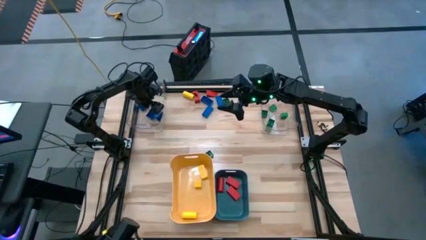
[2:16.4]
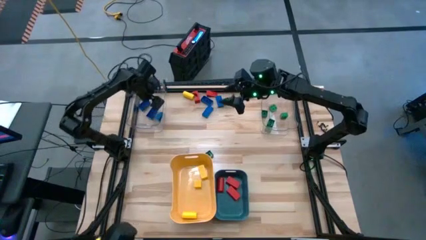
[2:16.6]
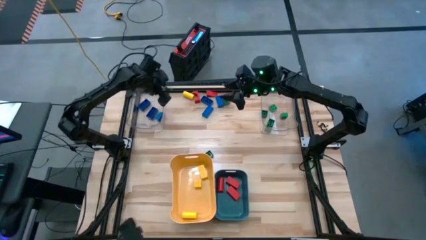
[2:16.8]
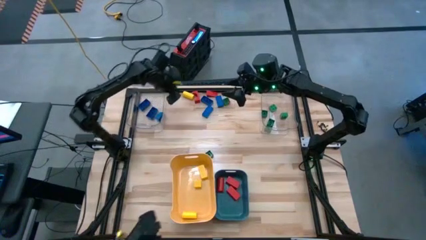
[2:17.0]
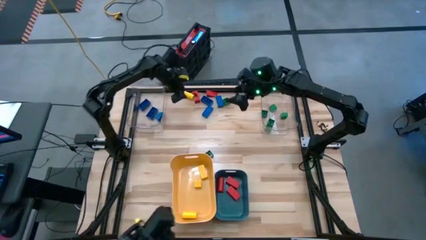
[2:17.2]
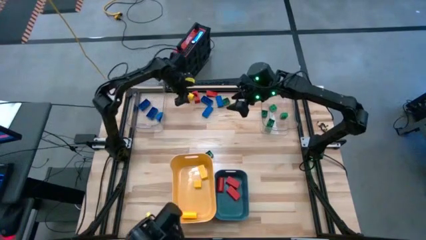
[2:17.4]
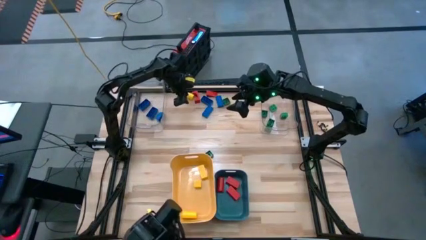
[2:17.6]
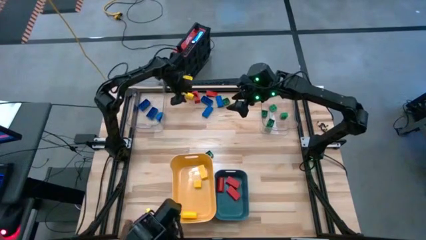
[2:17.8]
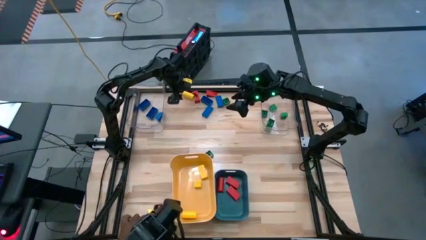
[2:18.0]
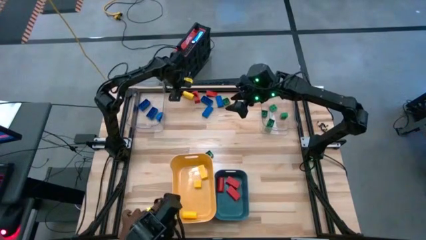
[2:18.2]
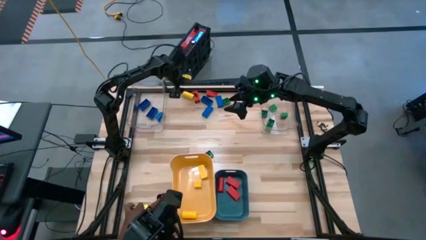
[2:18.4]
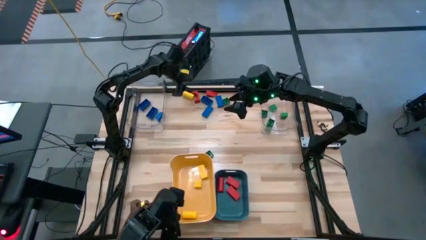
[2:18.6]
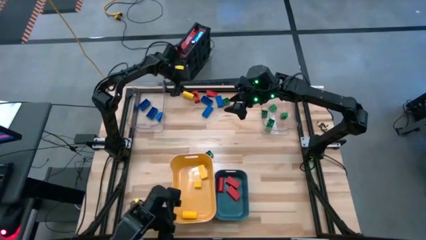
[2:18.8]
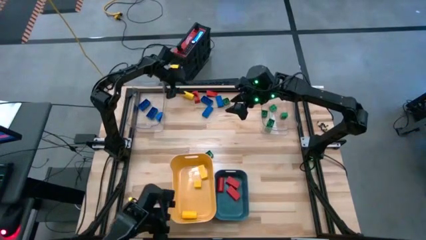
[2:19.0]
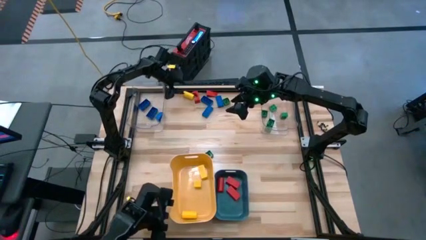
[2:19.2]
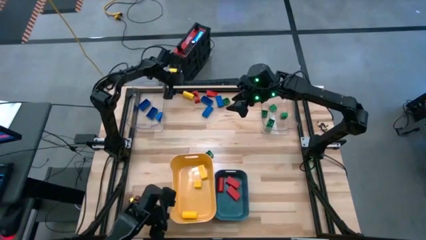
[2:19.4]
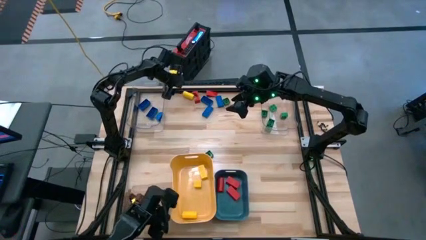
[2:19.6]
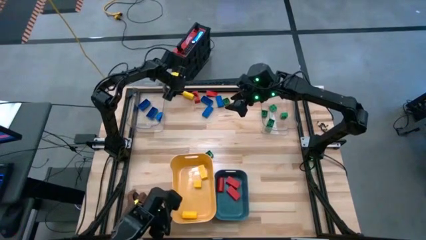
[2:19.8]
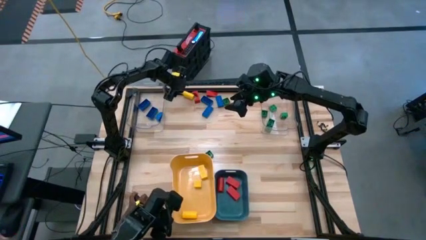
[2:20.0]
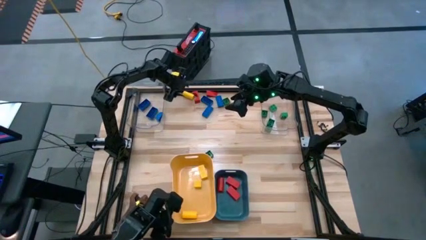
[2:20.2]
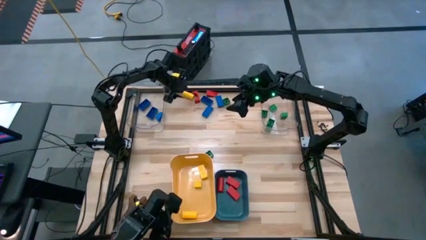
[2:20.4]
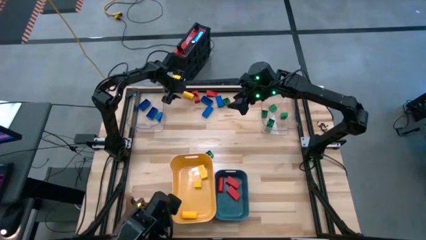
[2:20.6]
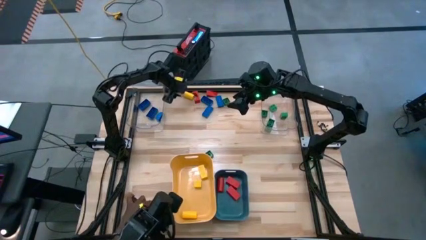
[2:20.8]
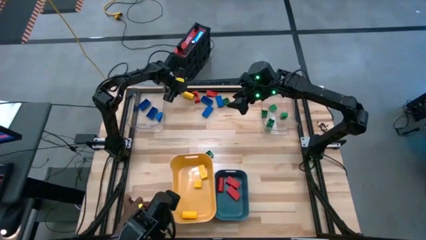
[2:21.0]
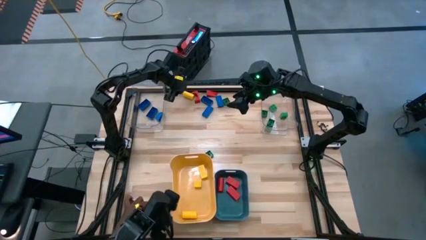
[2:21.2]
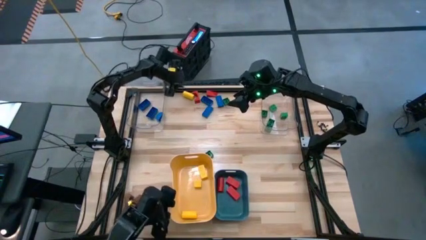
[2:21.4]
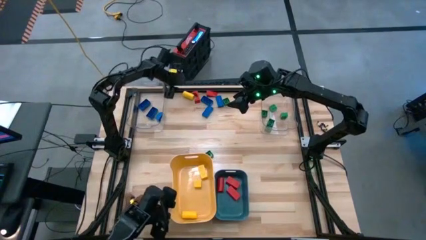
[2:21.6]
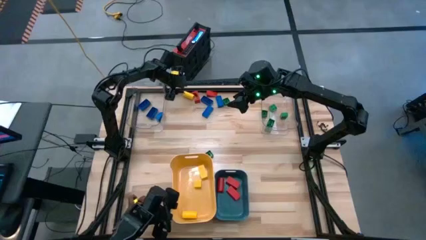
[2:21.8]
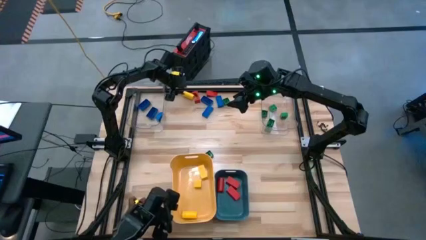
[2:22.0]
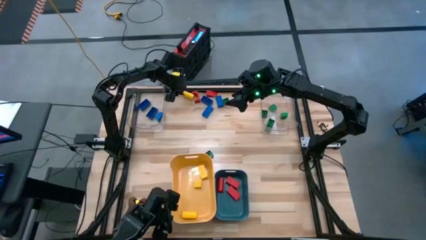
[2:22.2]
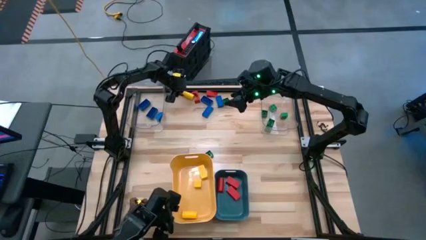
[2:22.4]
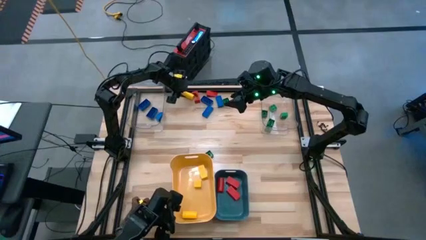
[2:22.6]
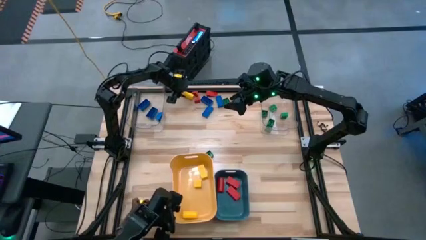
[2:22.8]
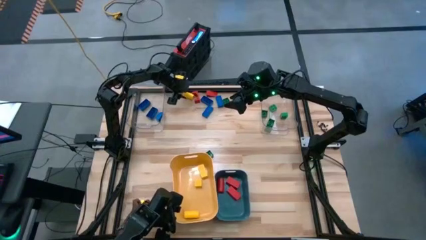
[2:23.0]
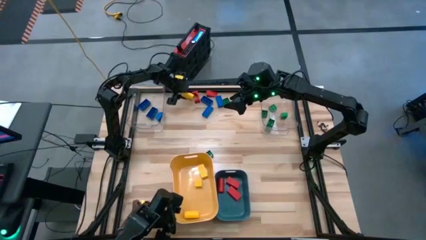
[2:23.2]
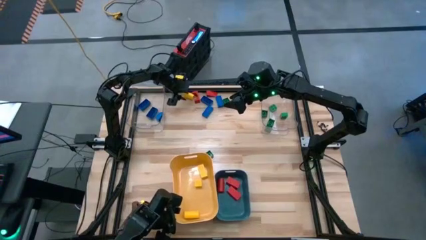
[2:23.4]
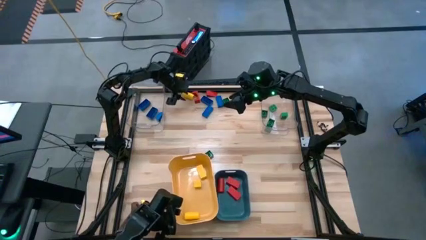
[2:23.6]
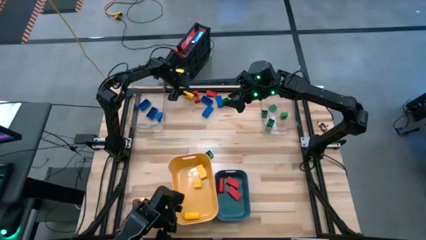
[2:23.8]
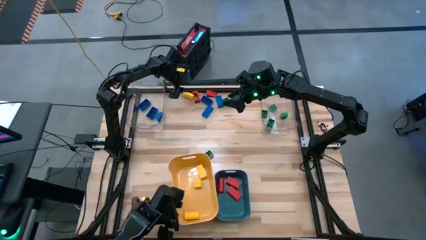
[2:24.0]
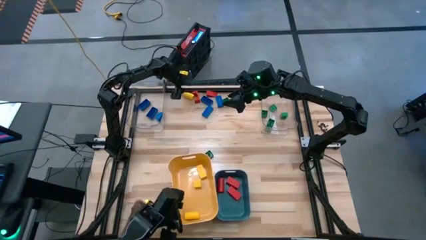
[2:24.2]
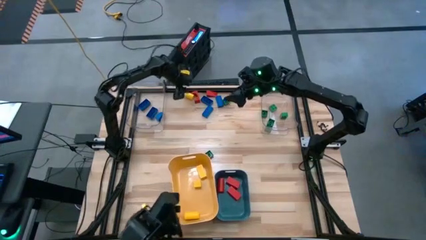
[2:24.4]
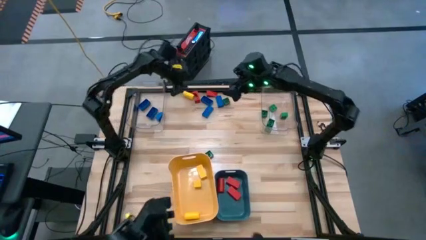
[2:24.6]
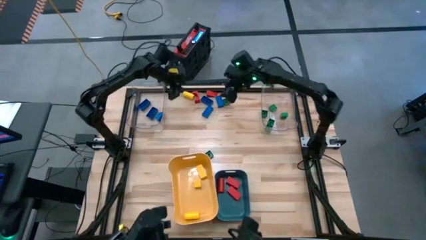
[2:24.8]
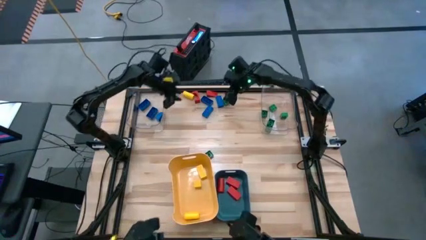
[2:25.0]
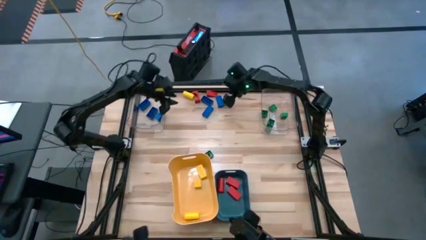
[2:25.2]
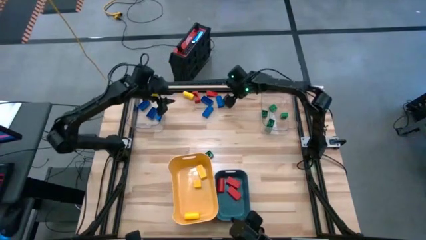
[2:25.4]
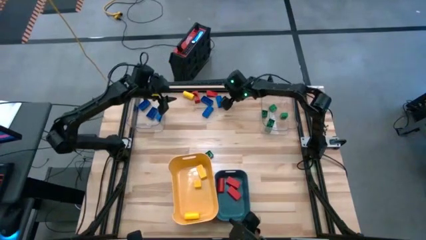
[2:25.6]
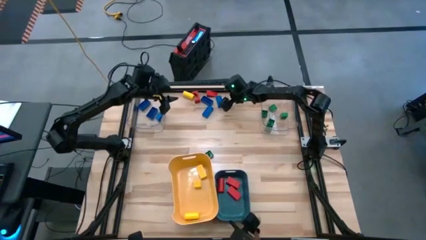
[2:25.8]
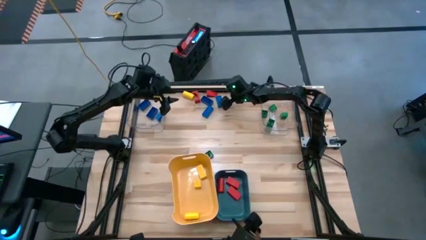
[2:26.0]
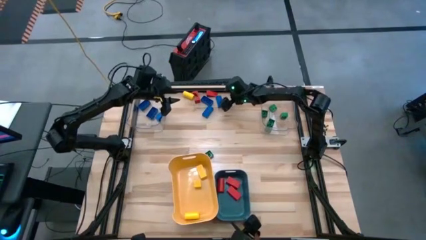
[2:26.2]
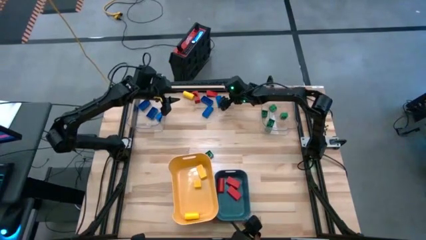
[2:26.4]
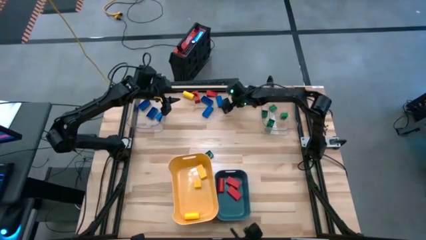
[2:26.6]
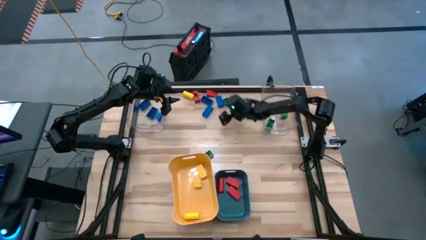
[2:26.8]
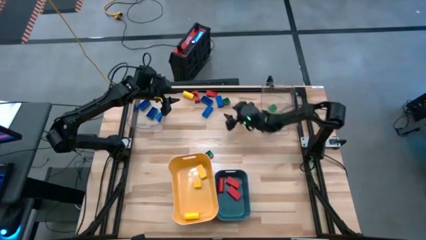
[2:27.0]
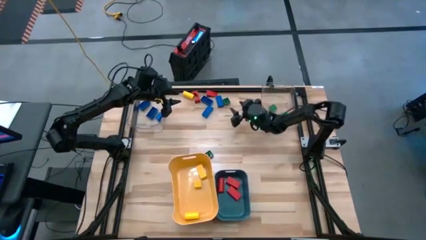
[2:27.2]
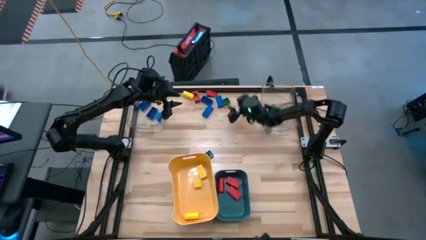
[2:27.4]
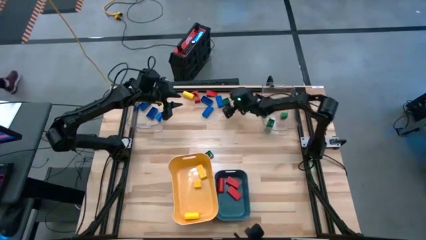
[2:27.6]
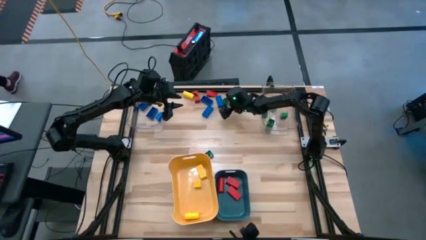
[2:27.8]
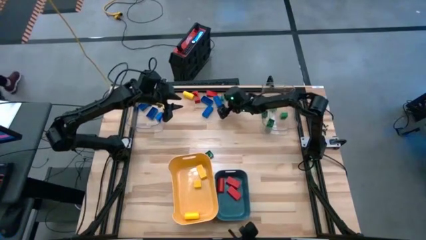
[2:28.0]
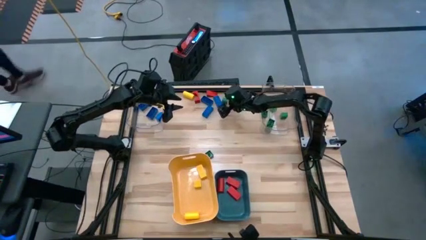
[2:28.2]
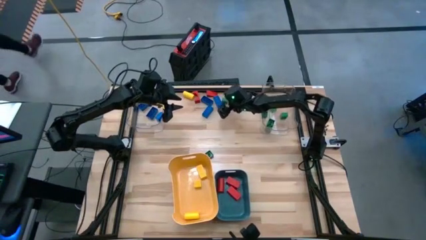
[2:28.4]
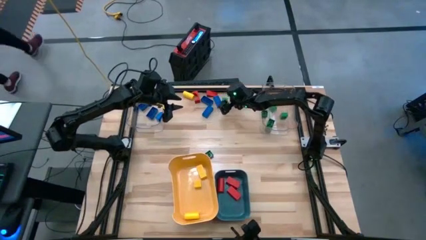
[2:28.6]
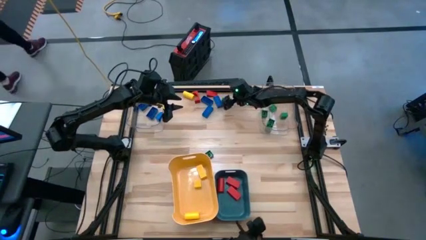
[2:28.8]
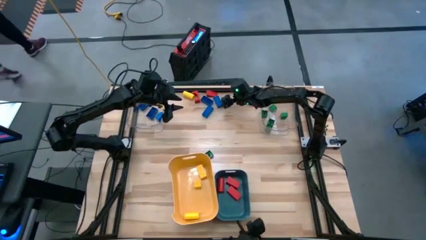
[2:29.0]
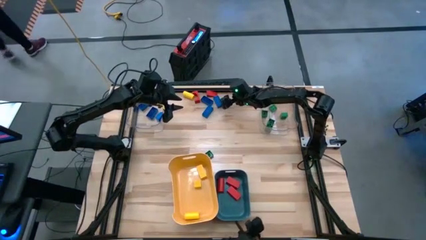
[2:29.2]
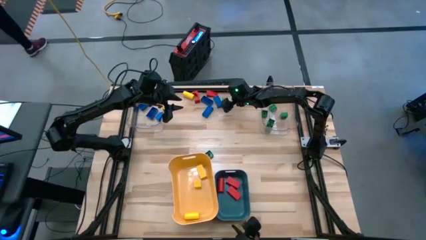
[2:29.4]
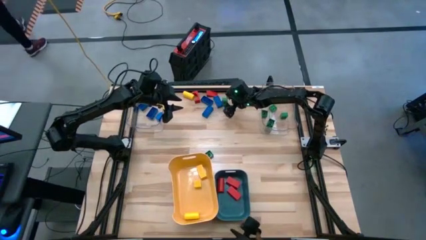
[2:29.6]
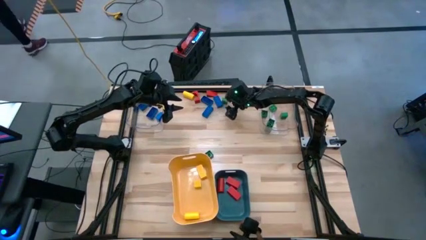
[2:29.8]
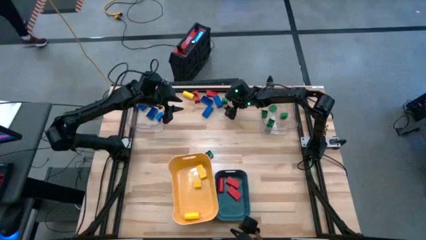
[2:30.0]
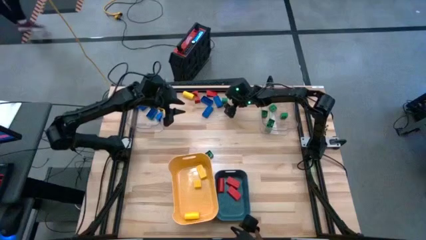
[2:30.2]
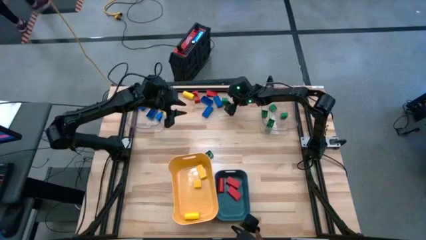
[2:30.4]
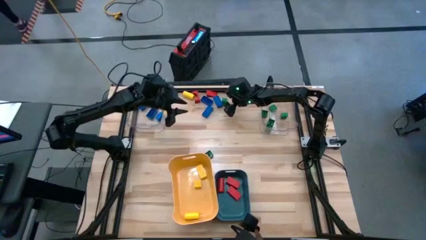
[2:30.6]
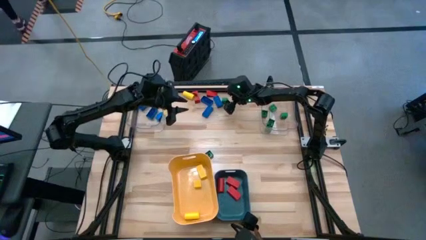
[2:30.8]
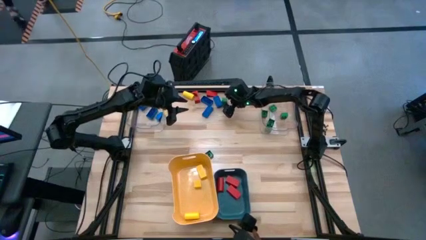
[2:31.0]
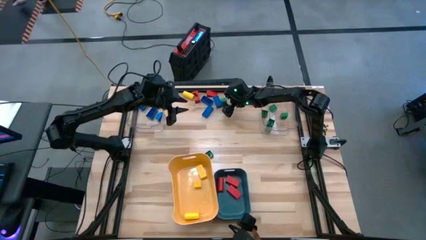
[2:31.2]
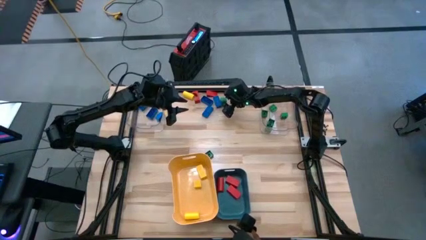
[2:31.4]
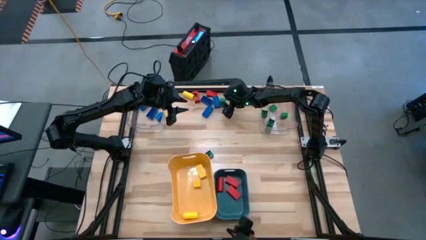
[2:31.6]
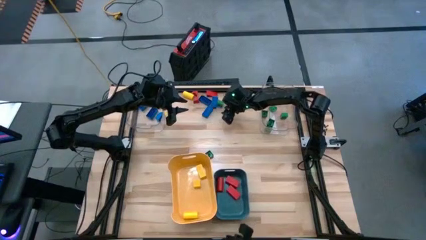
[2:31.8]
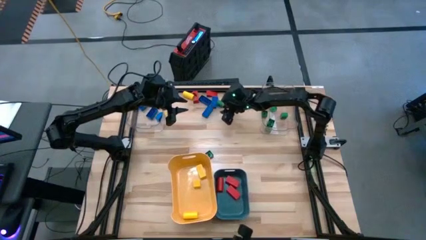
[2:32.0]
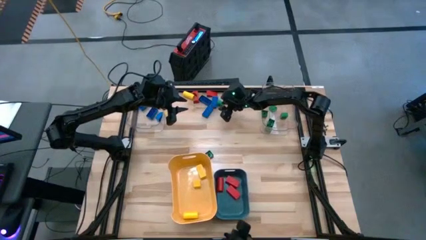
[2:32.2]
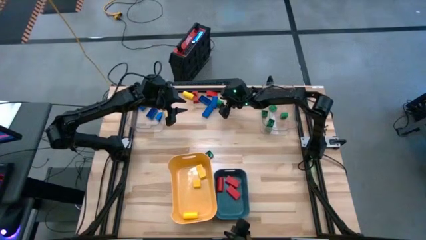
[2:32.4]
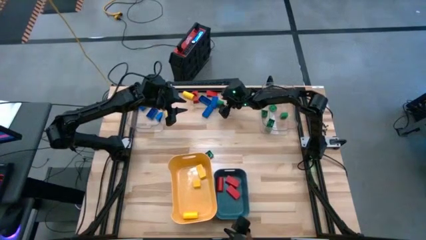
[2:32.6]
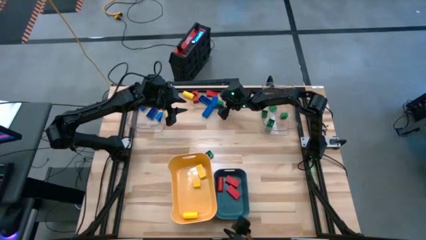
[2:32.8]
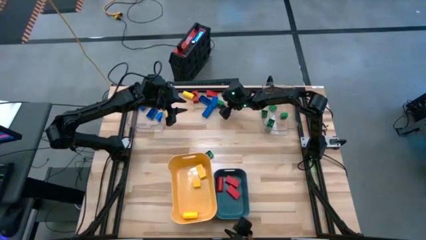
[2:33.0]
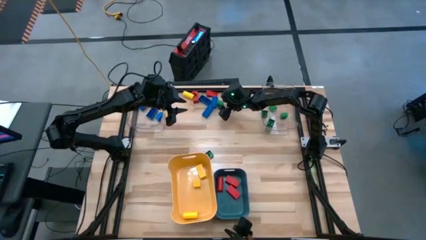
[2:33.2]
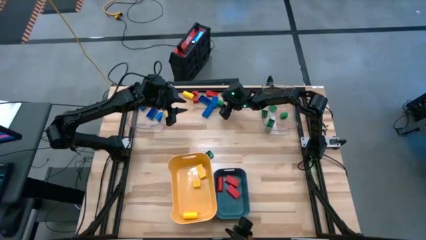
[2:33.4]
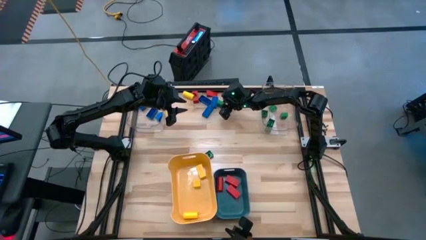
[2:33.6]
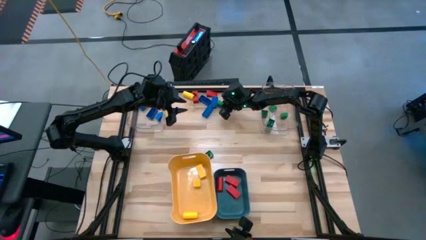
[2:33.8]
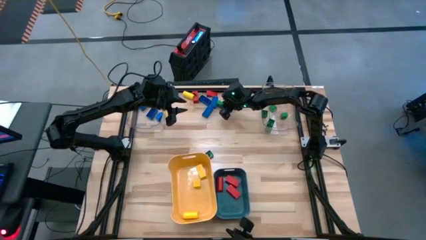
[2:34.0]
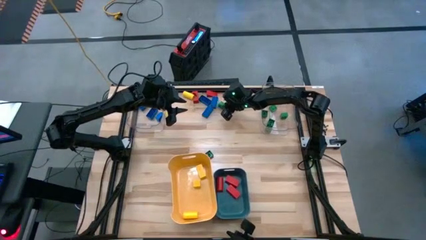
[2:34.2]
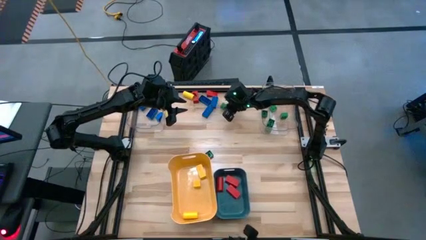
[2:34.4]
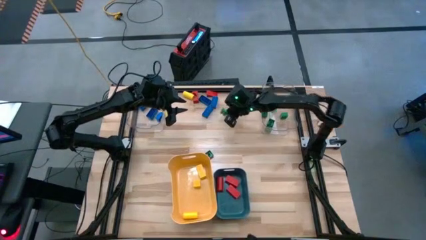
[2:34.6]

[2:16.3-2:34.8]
Task: Sort blocks
Put the green game piece into the right transparent bin
